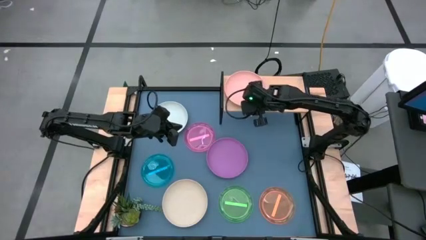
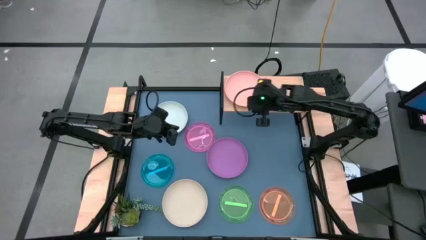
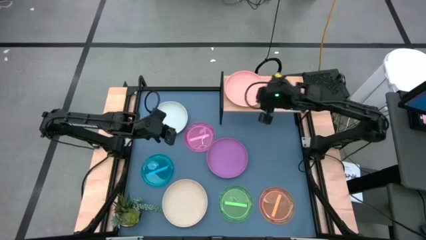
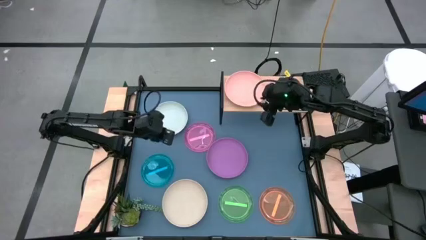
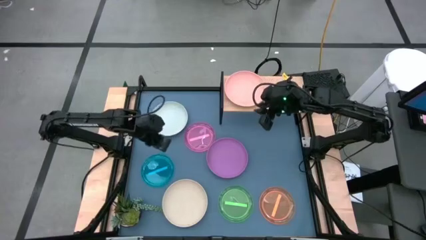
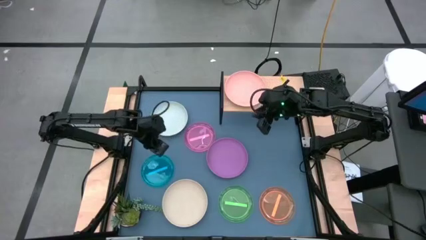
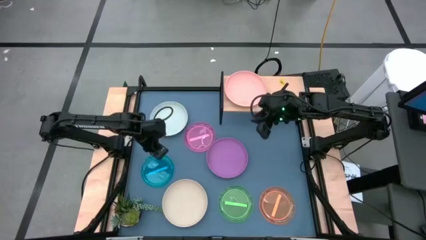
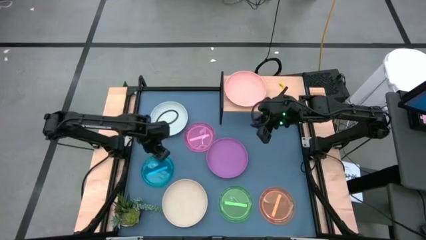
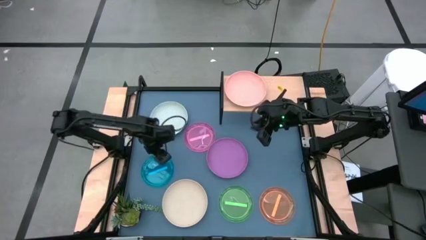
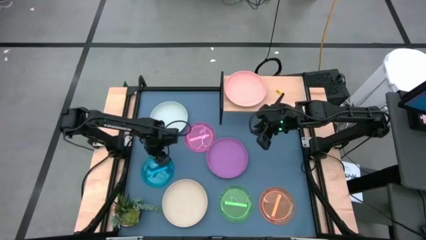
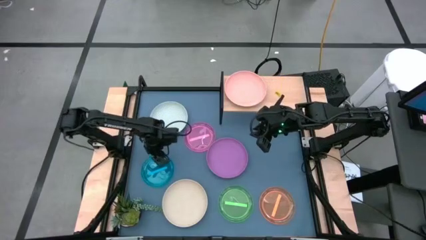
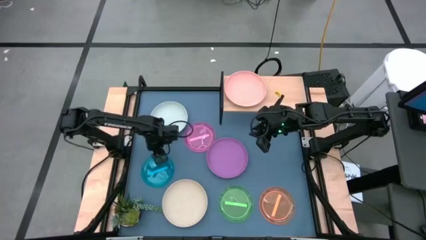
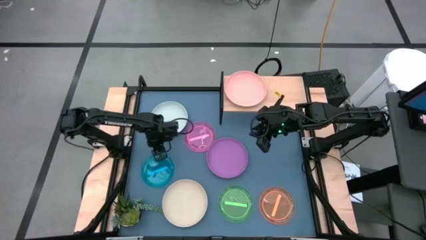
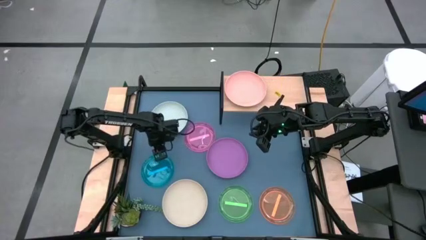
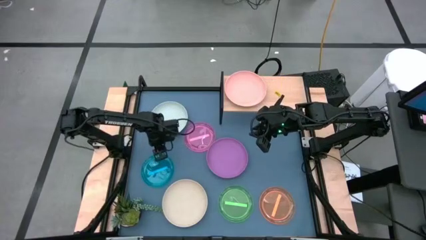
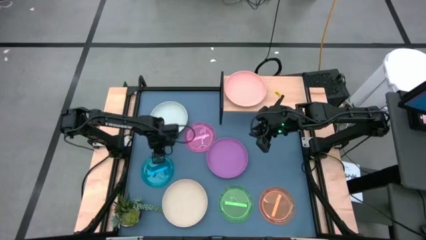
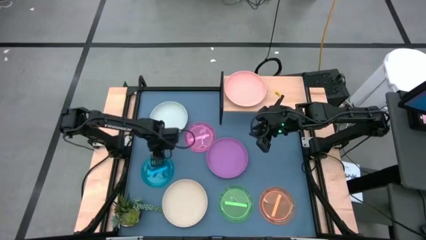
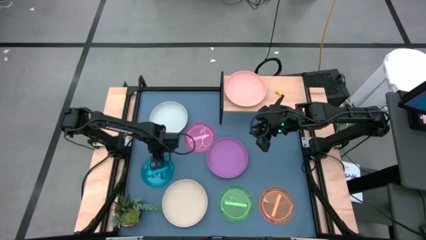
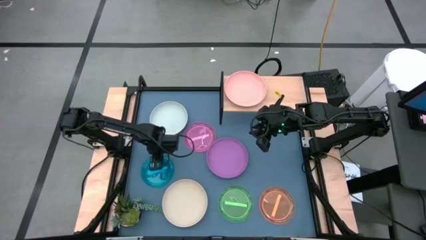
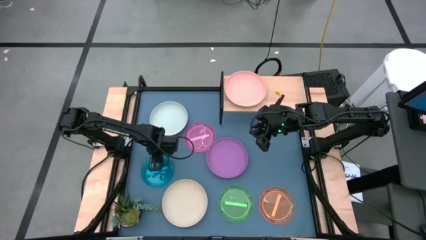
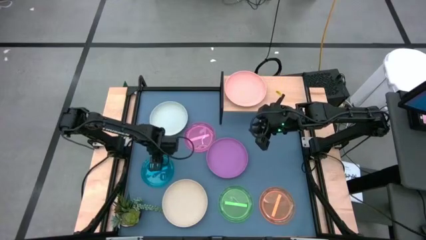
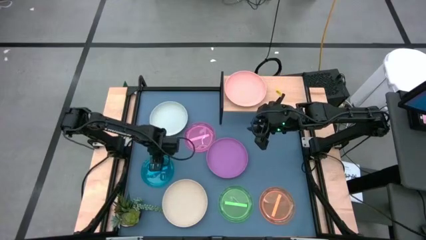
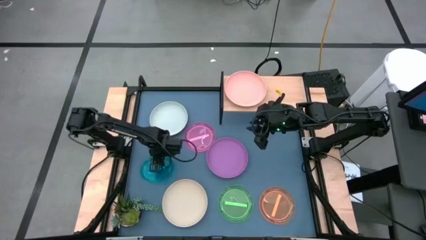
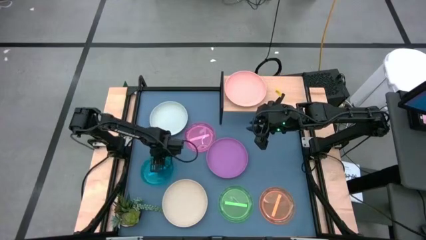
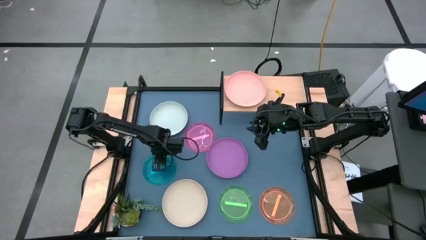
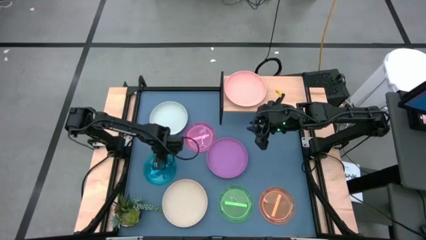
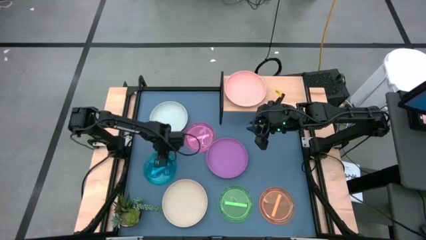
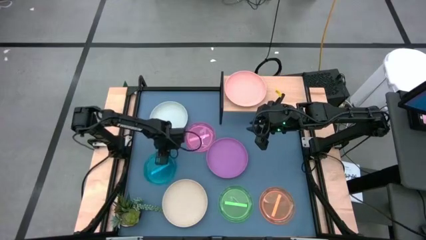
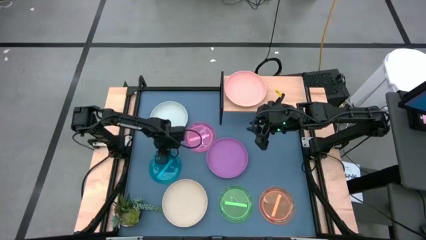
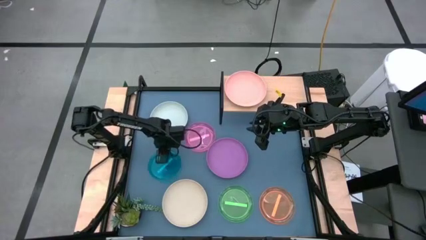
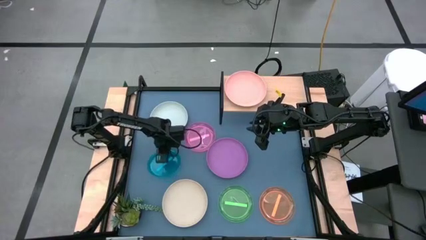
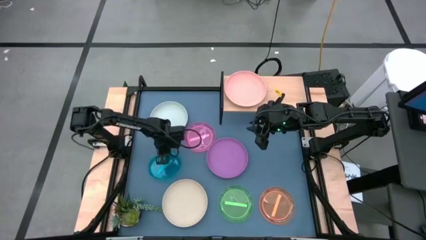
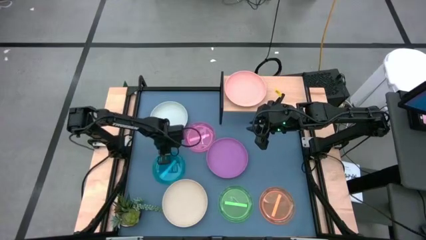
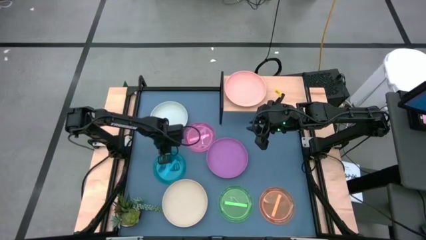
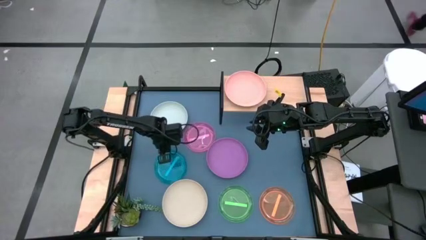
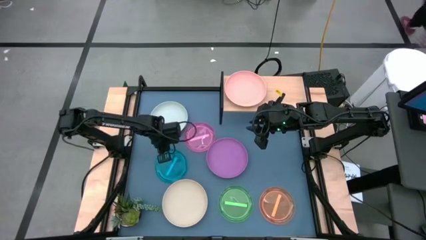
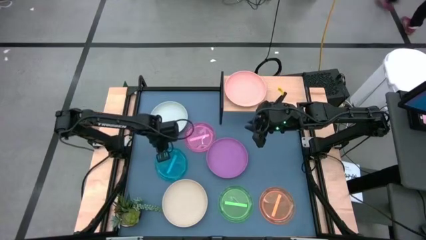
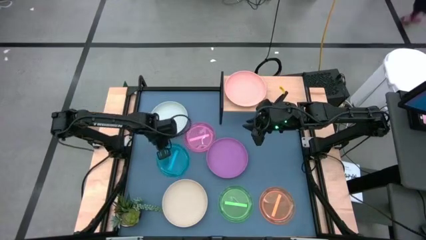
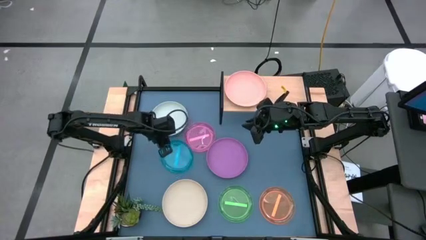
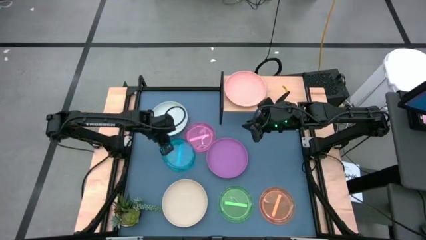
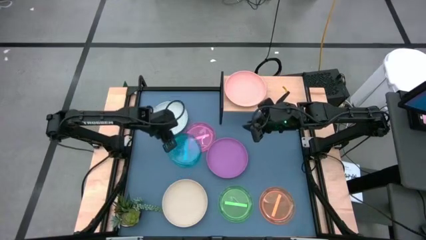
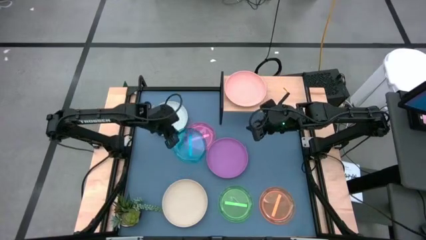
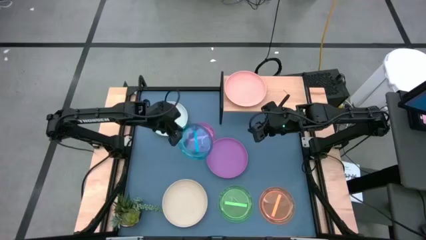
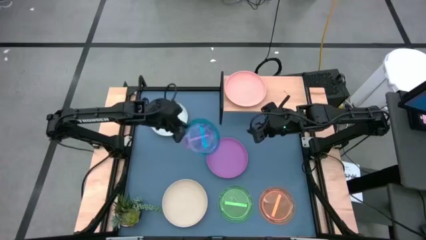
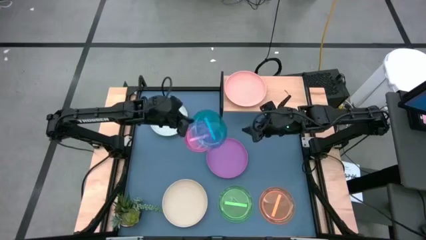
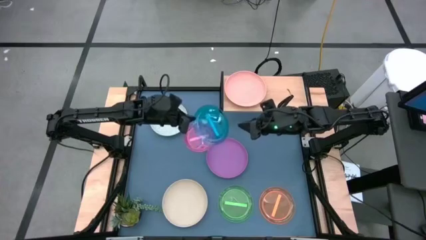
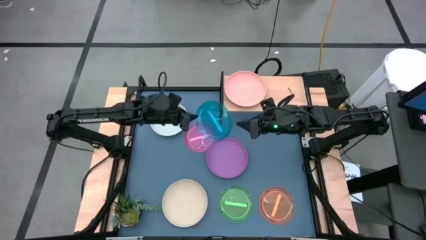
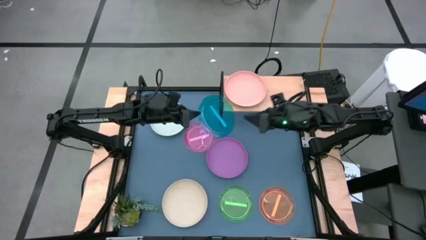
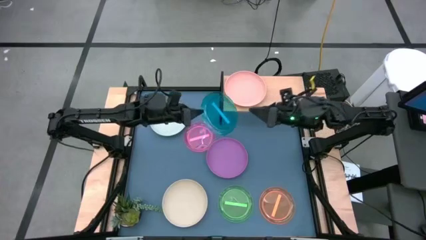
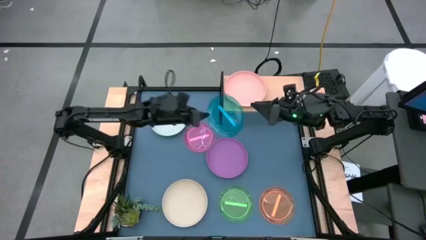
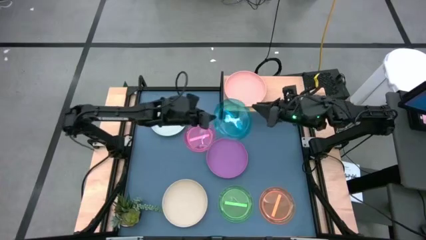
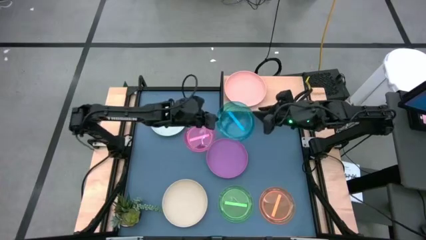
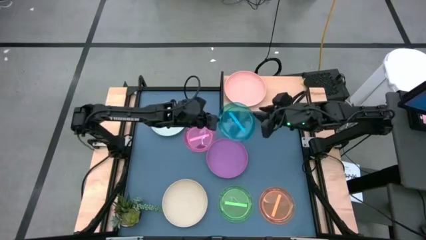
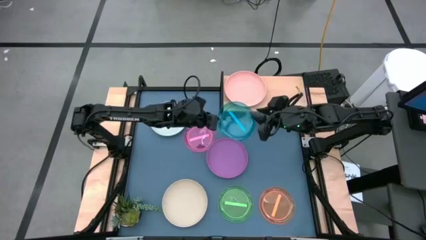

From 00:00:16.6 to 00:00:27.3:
Task: Place and stack plates onto a shelf
Put the small blue plate on the shelf
